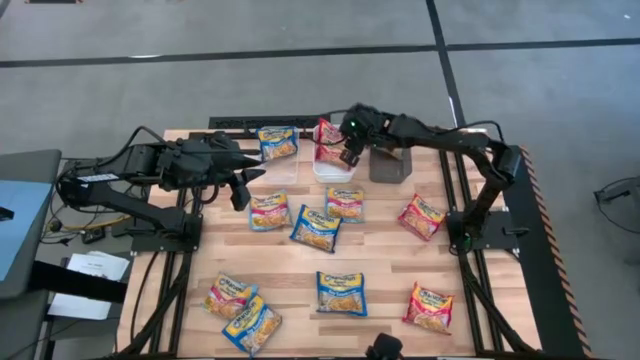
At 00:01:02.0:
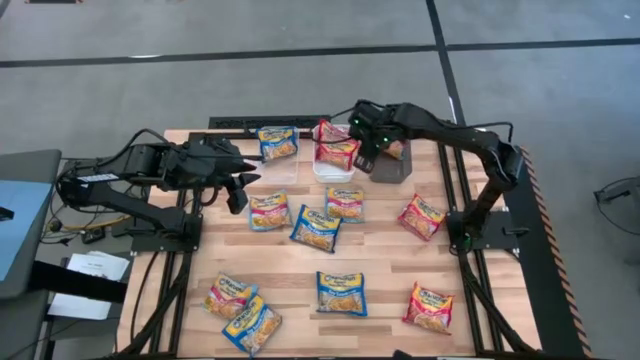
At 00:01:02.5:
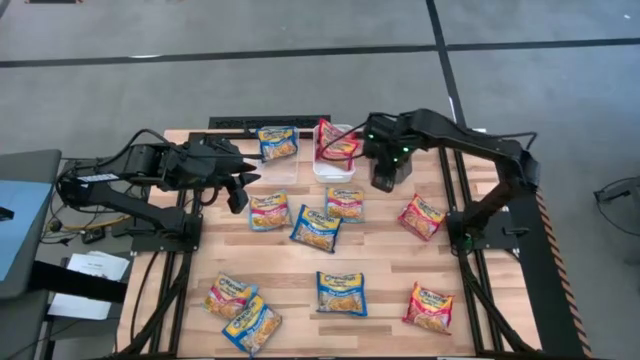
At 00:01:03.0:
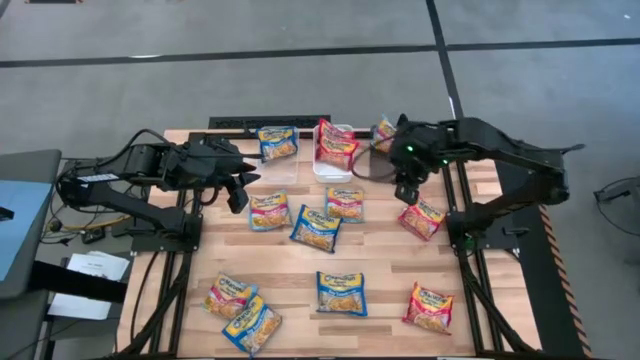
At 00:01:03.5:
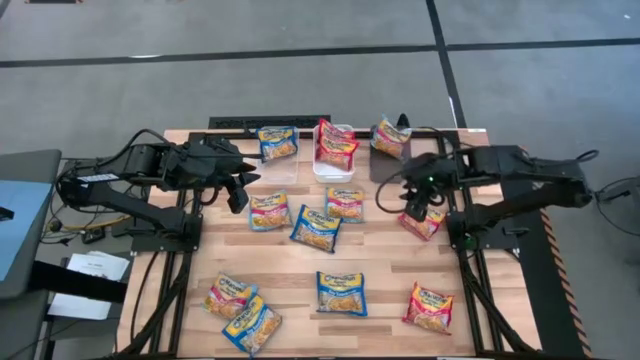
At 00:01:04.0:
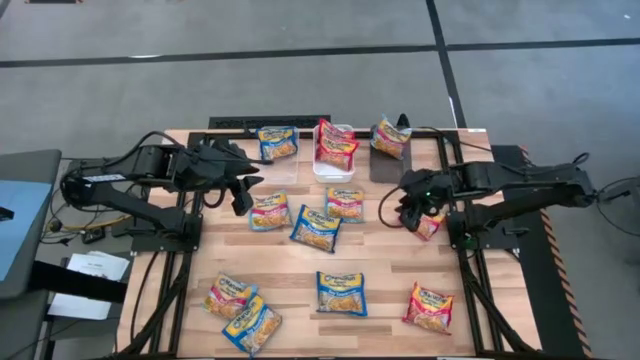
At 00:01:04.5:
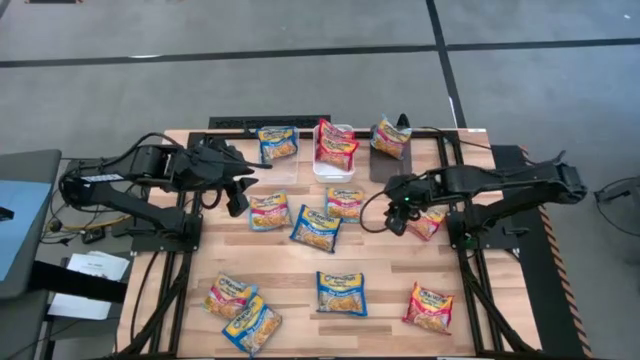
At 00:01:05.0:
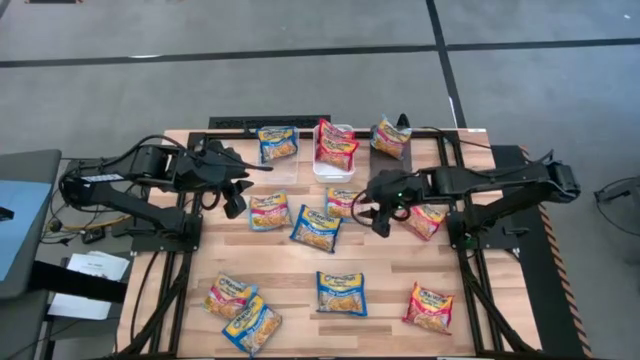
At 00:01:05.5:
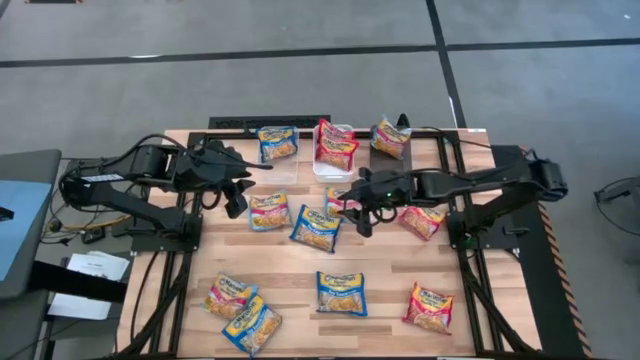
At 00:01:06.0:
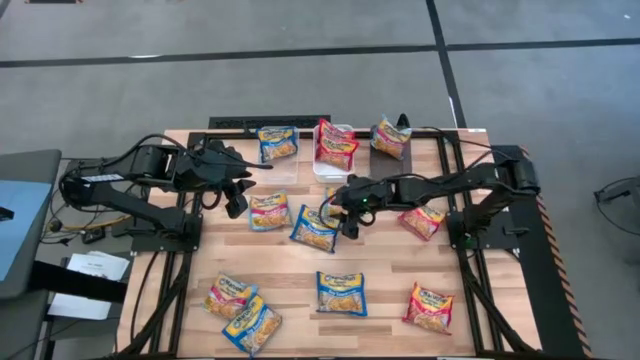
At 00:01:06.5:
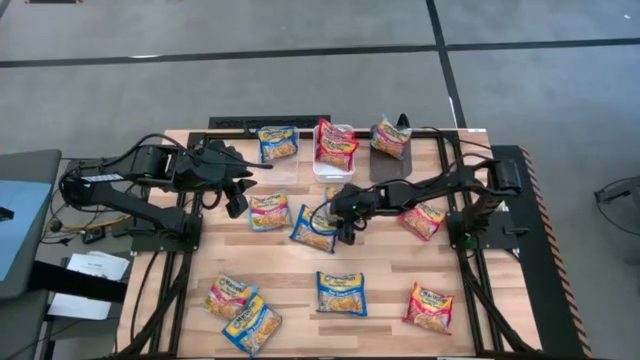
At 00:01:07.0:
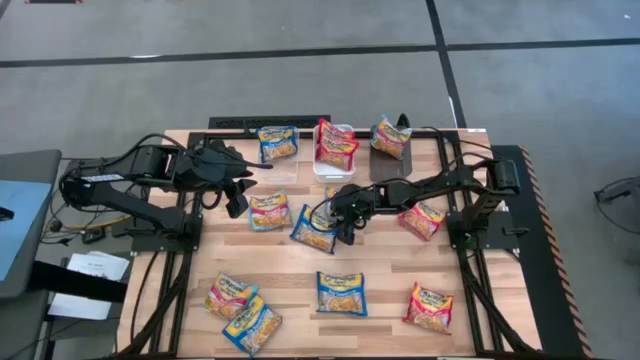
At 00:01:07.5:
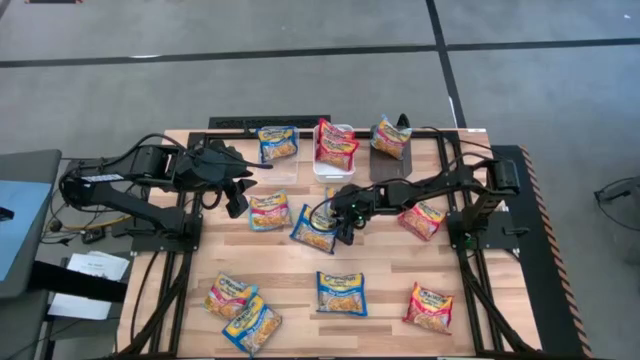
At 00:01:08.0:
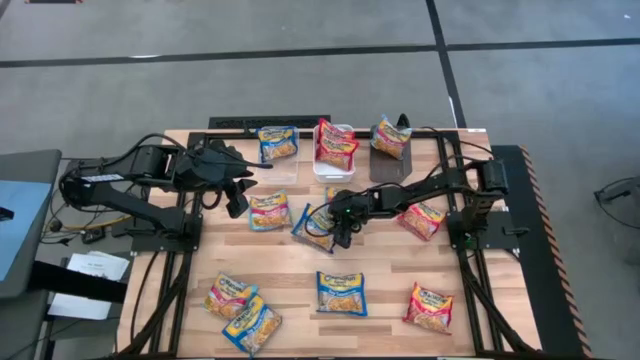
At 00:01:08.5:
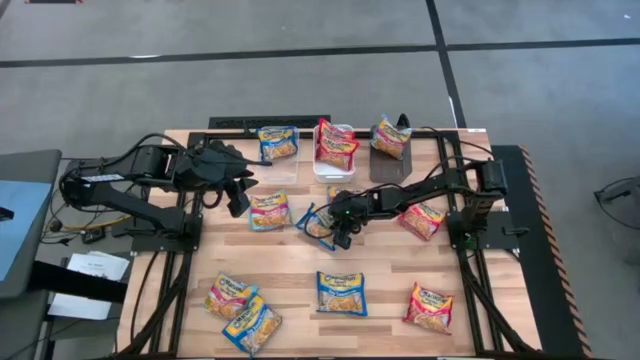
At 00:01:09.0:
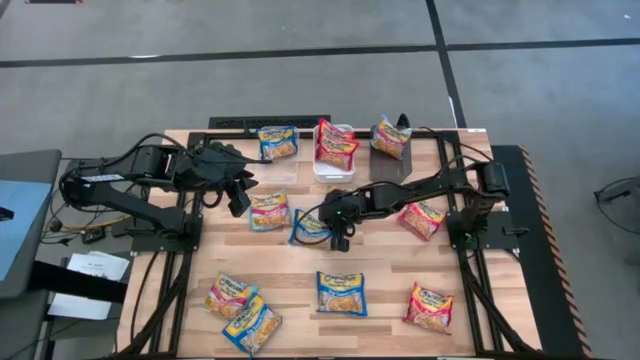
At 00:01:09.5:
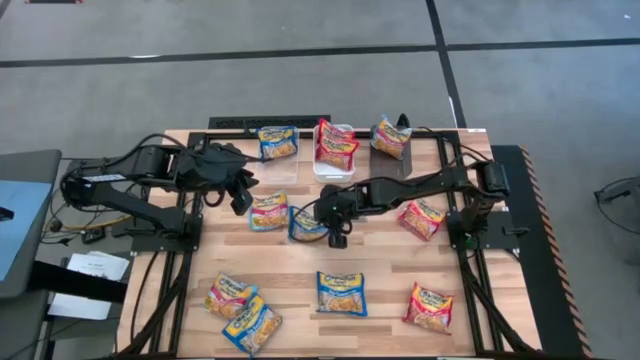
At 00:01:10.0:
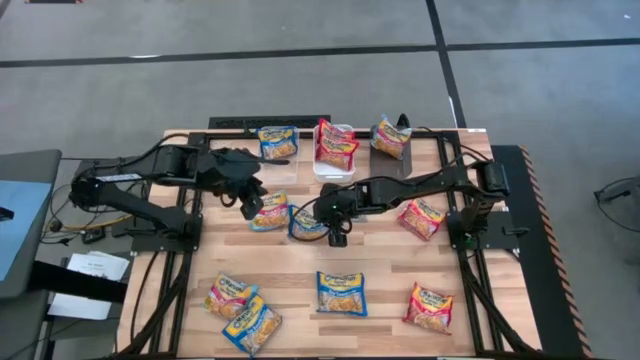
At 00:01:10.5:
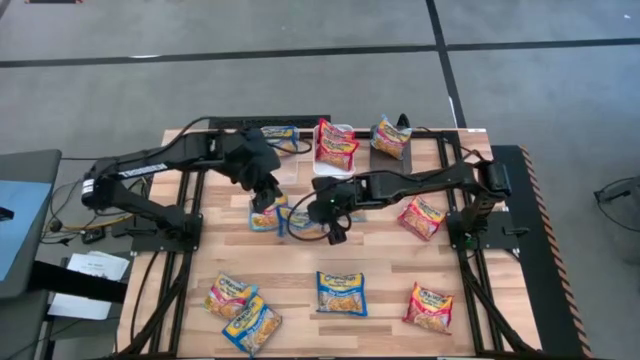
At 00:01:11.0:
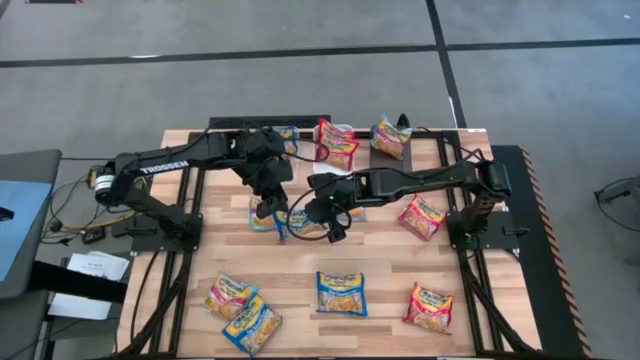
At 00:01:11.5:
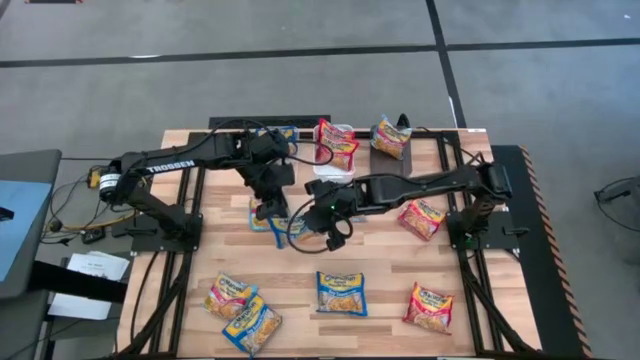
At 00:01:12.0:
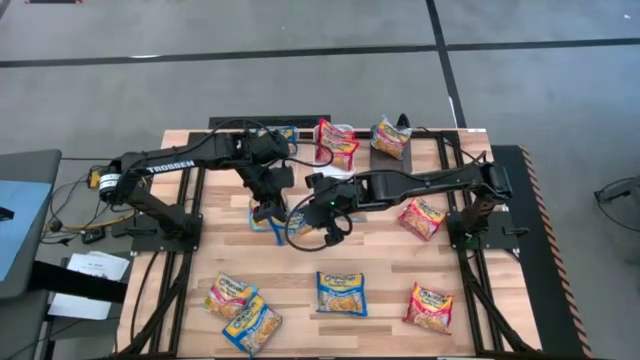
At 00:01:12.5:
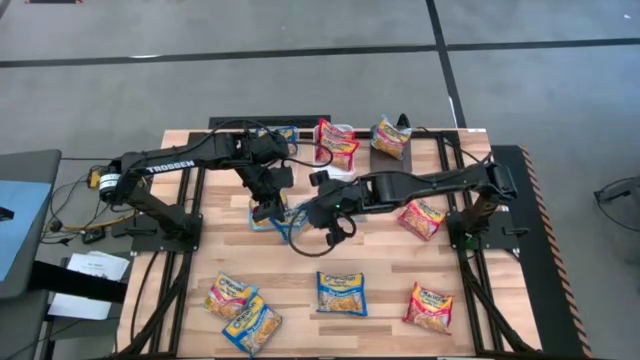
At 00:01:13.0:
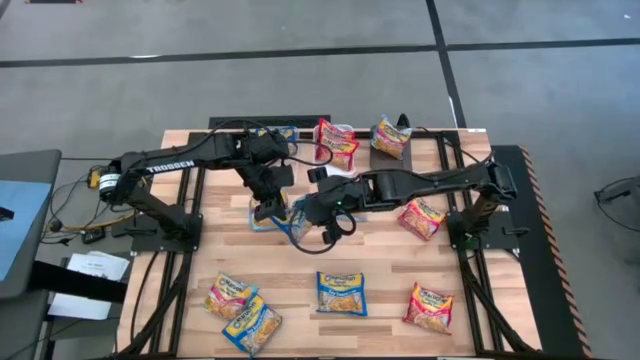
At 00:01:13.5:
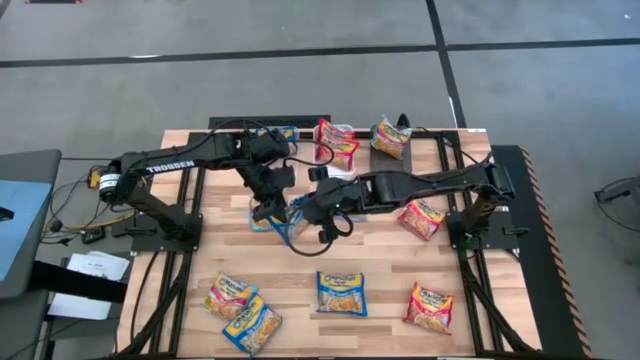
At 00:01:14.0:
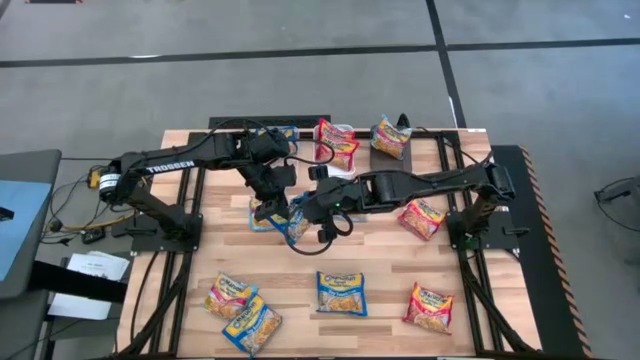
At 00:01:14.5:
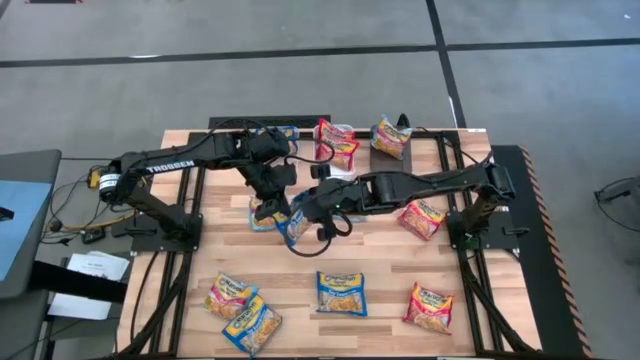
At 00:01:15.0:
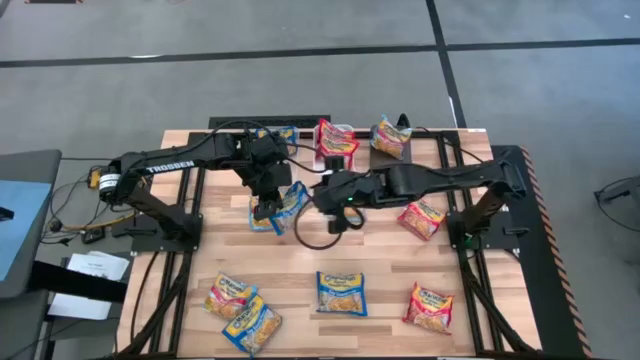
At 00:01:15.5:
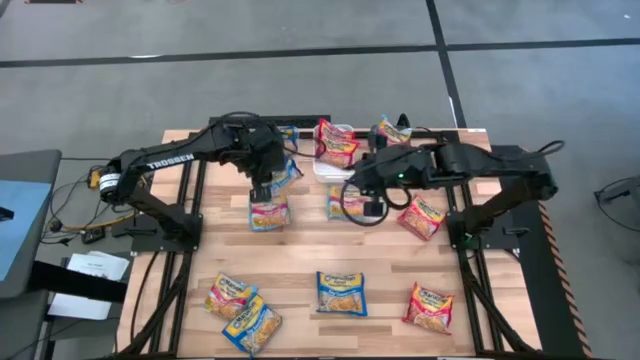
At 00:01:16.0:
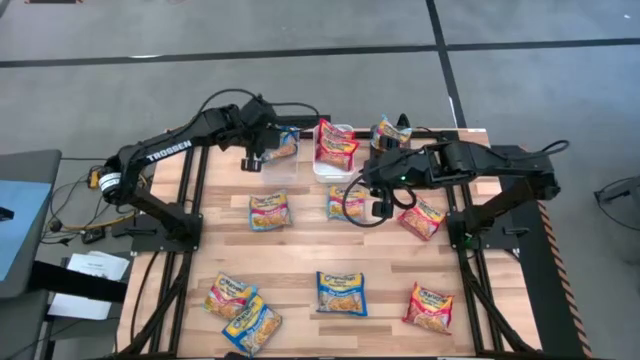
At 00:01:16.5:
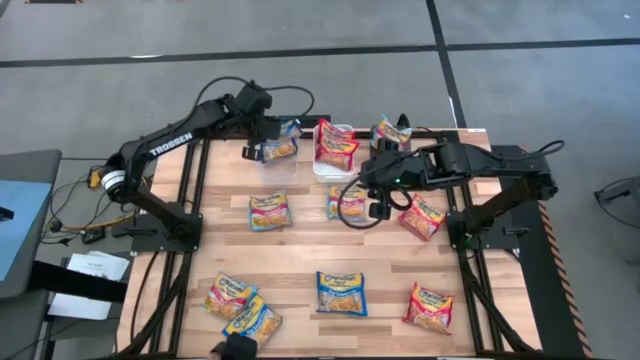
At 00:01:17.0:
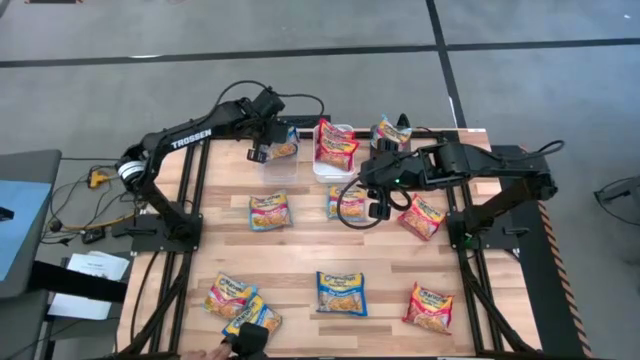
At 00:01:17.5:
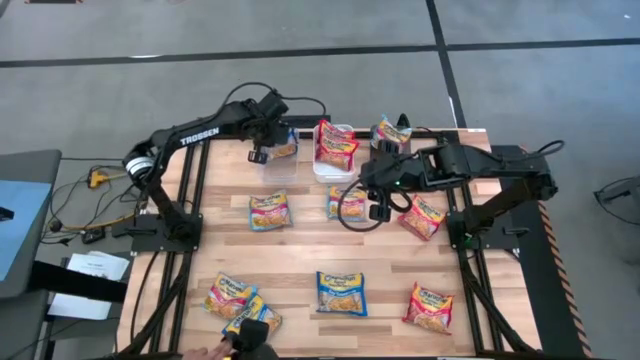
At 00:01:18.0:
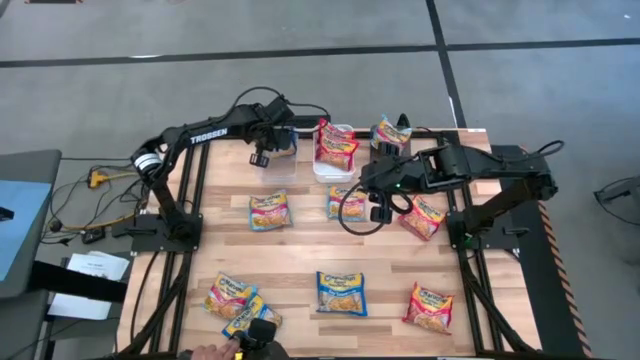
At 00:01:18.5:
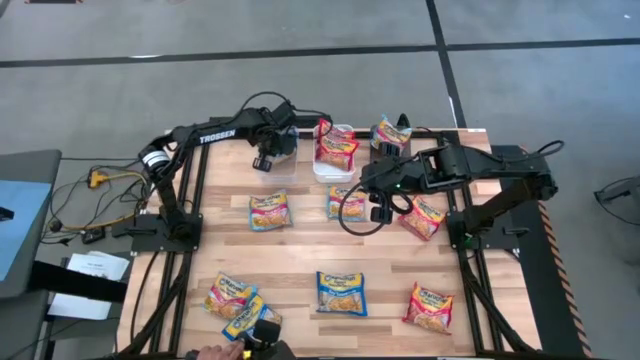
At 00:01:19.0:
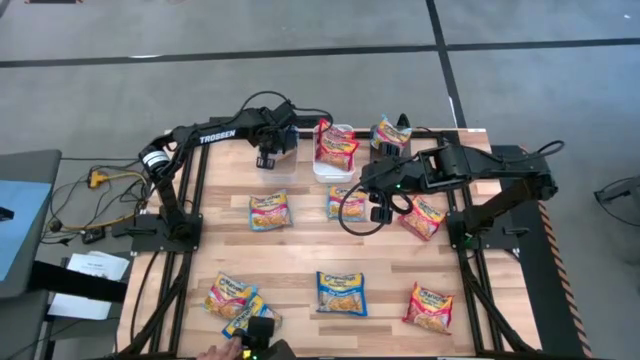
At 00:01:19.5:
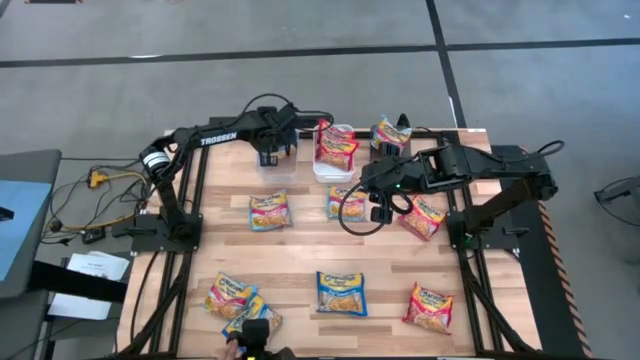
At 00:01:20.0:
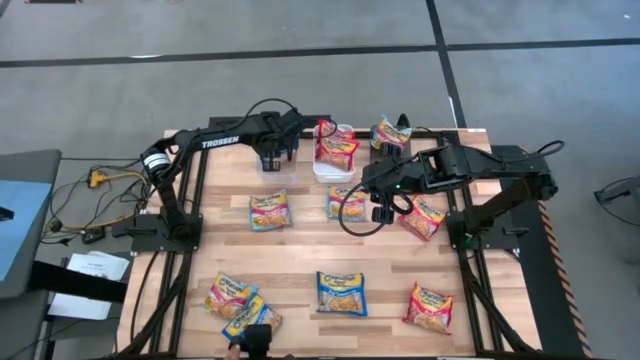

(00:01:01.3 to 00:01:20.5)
Task: Sort Maruchan noodles
Put the blue noodle pack into the transparent bin
